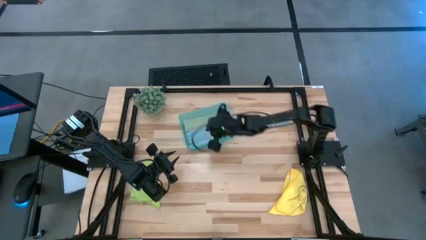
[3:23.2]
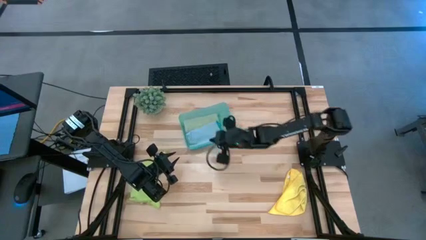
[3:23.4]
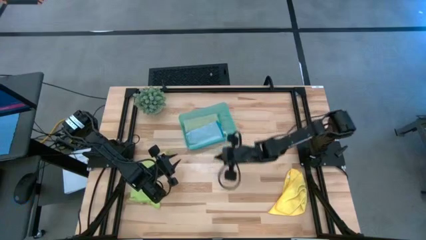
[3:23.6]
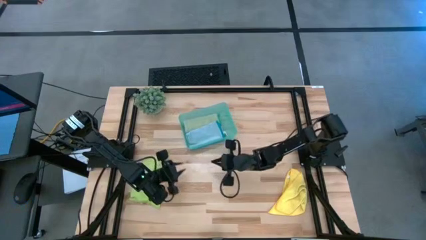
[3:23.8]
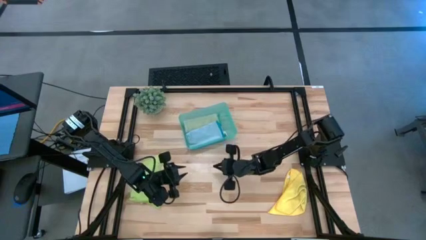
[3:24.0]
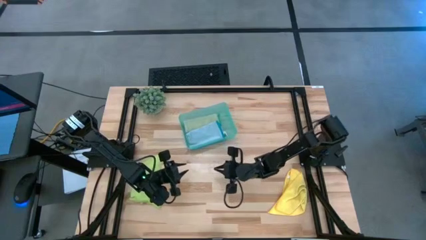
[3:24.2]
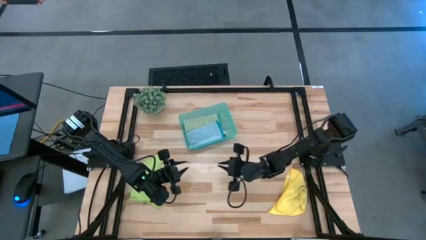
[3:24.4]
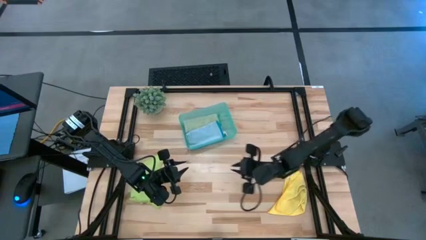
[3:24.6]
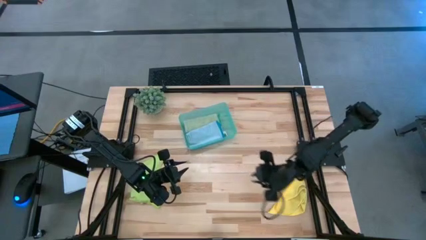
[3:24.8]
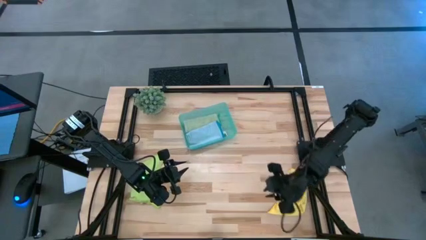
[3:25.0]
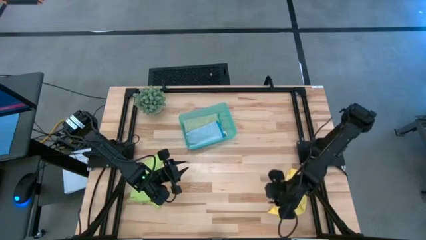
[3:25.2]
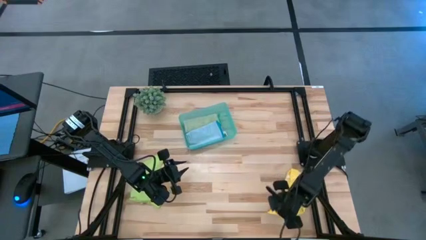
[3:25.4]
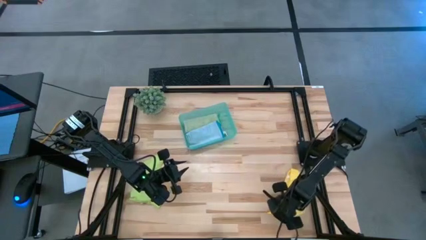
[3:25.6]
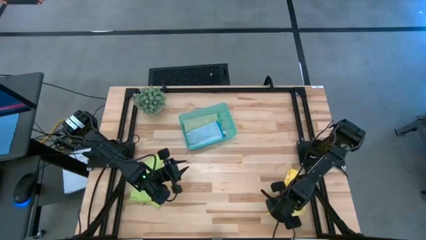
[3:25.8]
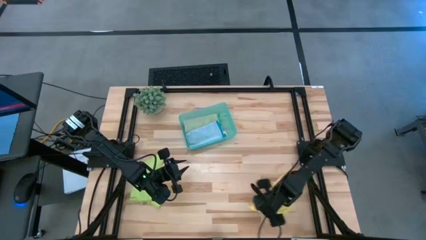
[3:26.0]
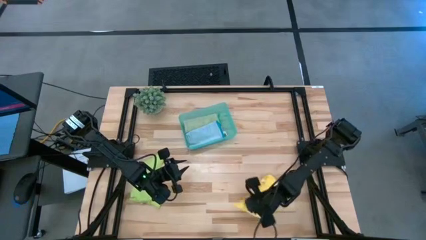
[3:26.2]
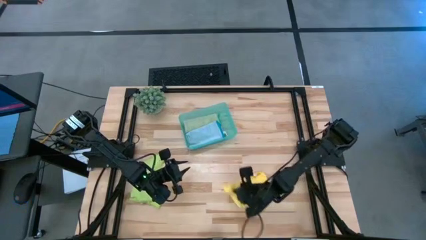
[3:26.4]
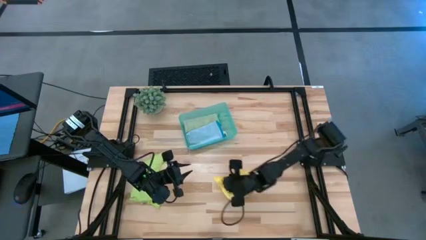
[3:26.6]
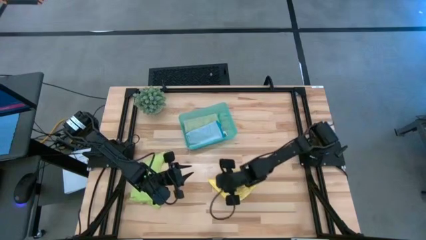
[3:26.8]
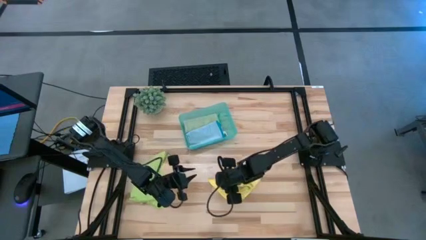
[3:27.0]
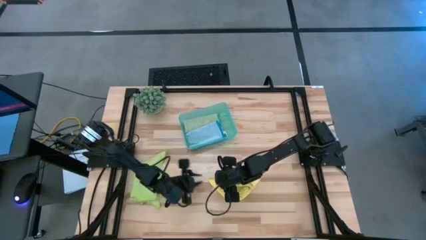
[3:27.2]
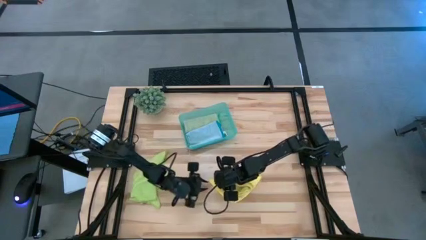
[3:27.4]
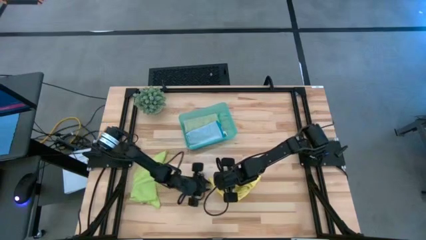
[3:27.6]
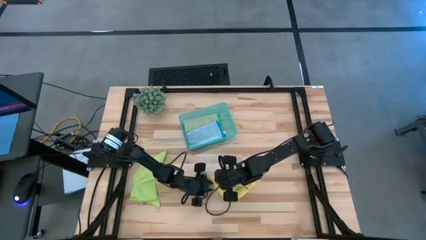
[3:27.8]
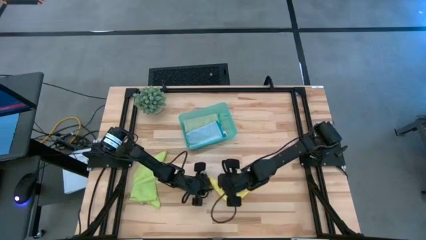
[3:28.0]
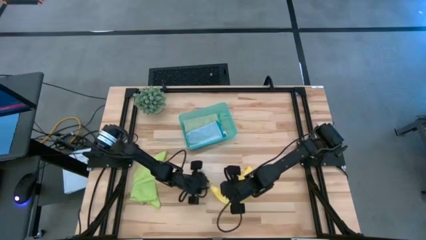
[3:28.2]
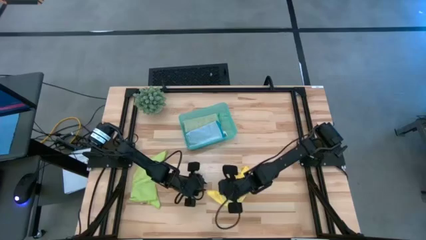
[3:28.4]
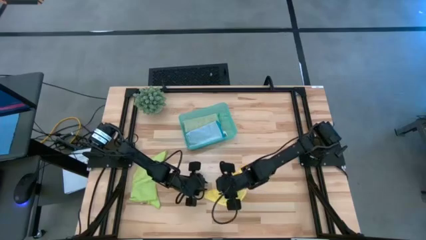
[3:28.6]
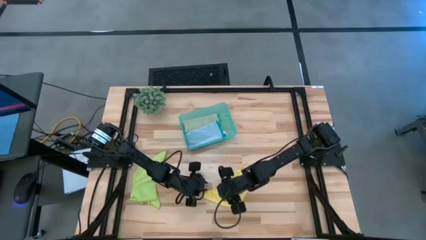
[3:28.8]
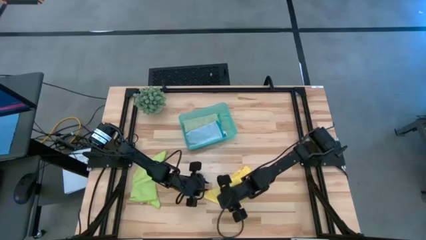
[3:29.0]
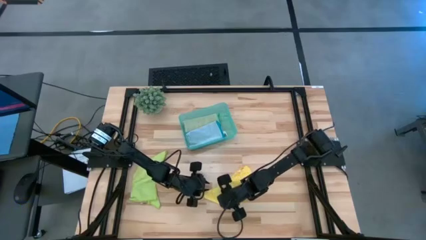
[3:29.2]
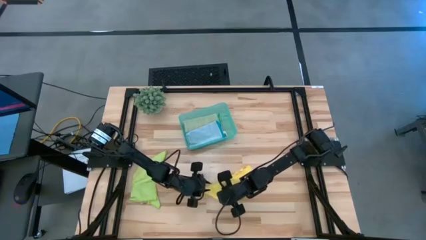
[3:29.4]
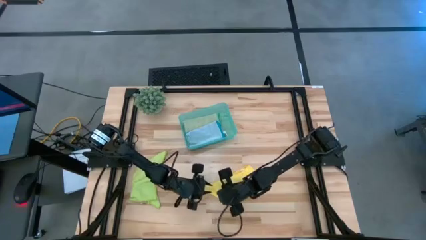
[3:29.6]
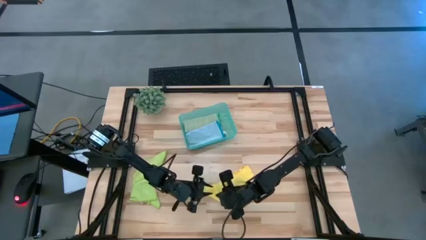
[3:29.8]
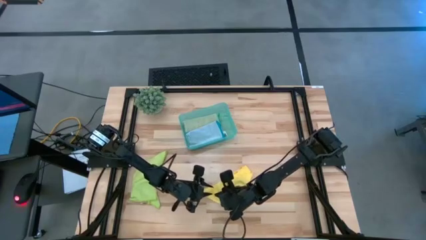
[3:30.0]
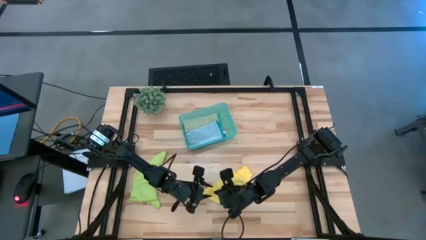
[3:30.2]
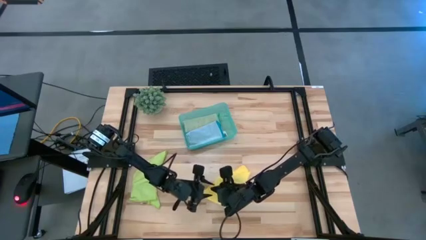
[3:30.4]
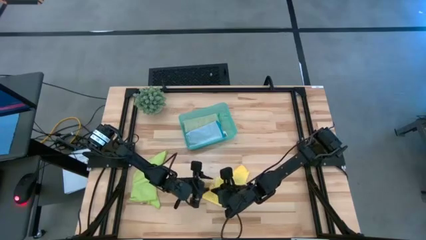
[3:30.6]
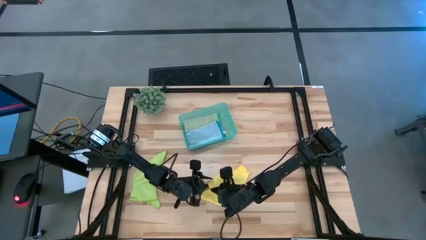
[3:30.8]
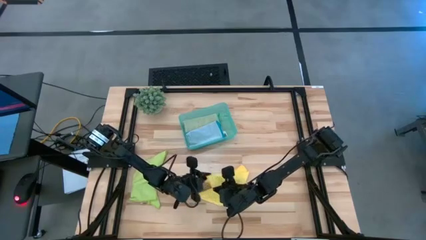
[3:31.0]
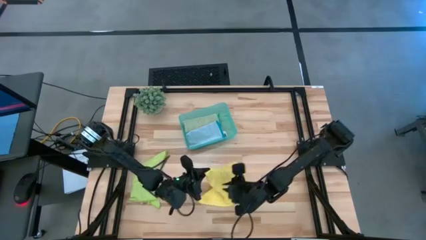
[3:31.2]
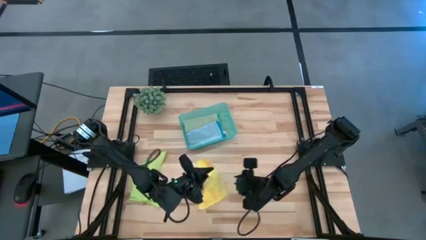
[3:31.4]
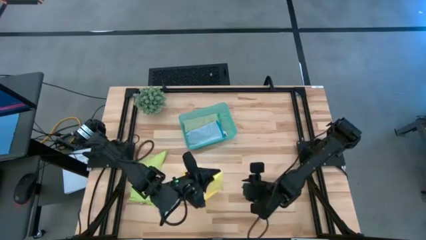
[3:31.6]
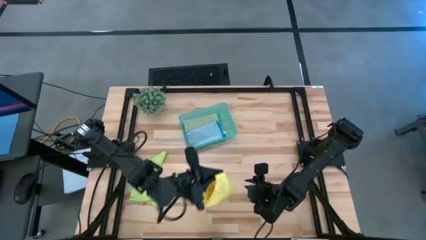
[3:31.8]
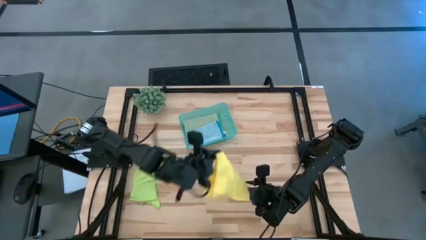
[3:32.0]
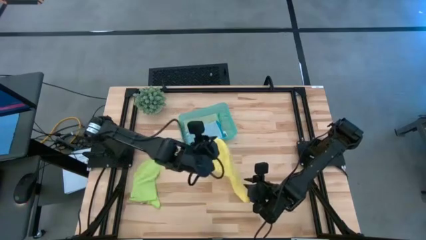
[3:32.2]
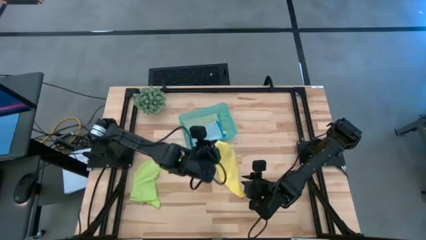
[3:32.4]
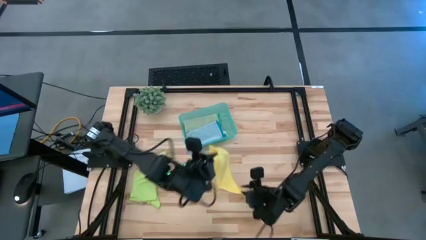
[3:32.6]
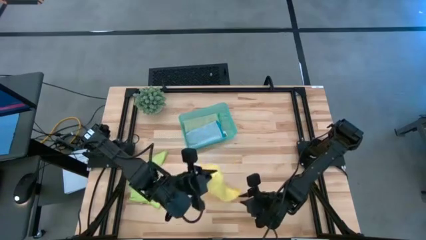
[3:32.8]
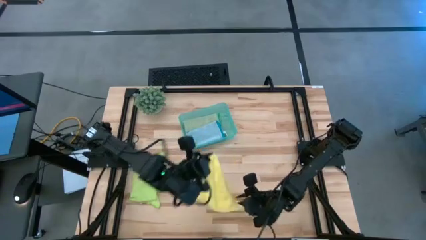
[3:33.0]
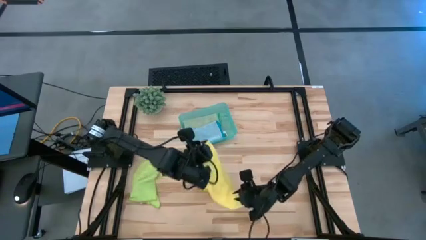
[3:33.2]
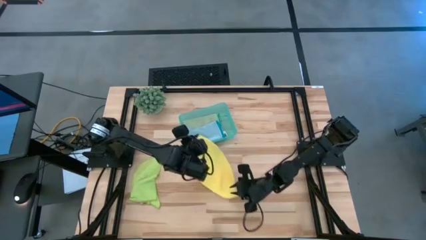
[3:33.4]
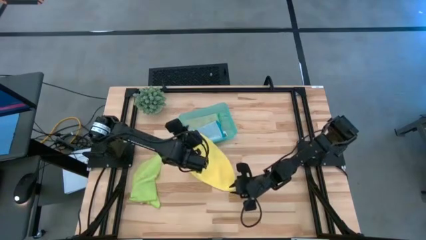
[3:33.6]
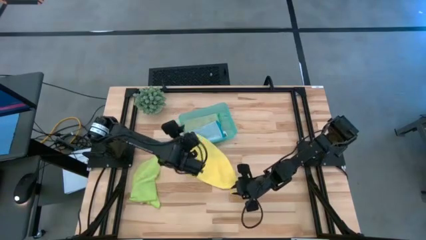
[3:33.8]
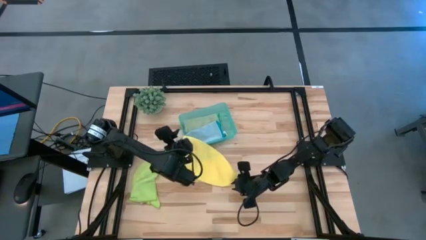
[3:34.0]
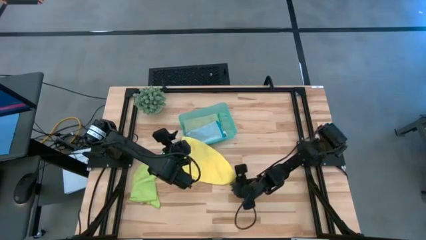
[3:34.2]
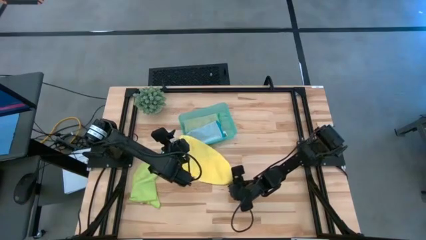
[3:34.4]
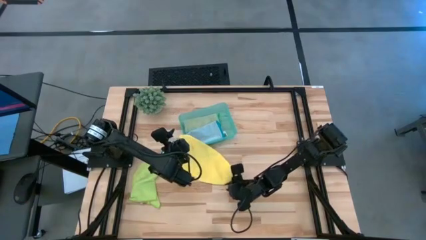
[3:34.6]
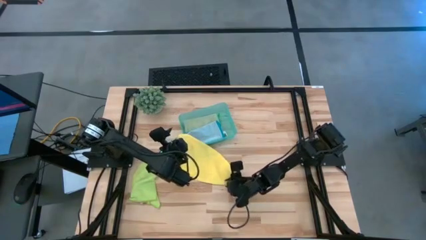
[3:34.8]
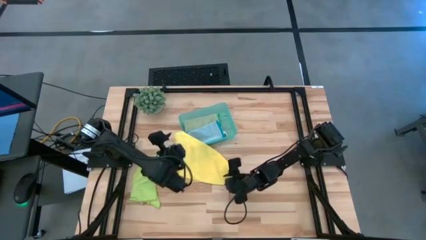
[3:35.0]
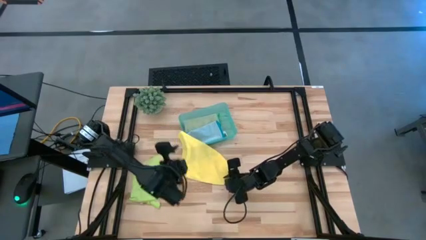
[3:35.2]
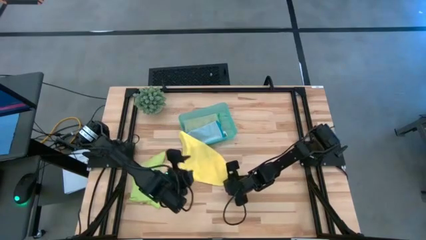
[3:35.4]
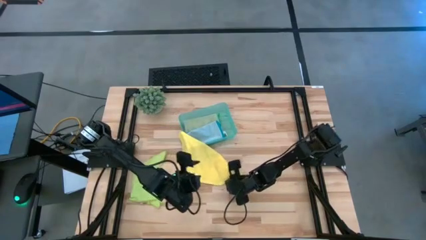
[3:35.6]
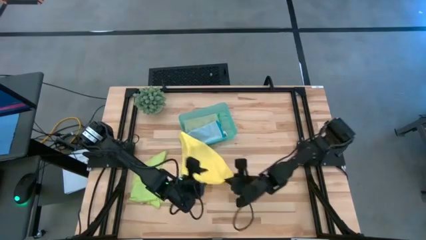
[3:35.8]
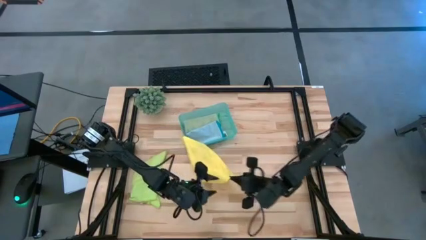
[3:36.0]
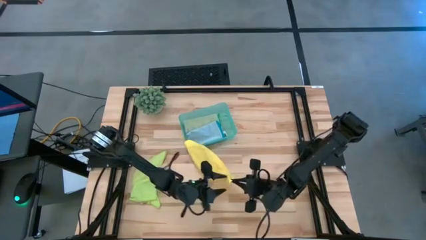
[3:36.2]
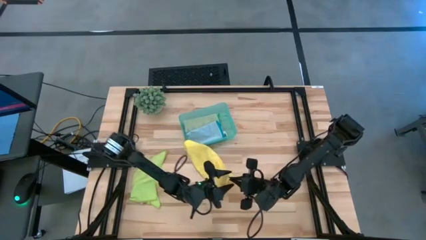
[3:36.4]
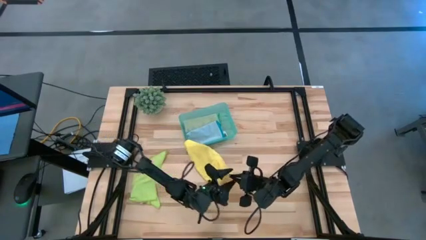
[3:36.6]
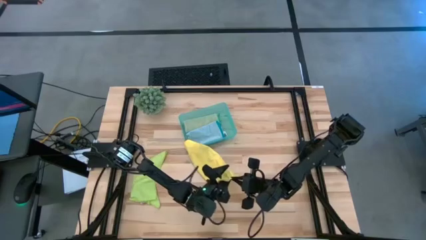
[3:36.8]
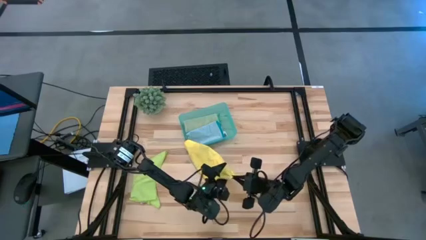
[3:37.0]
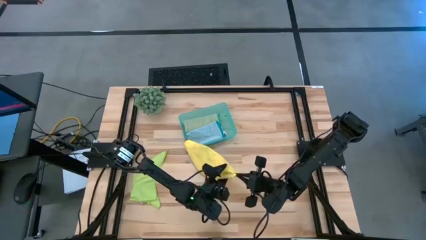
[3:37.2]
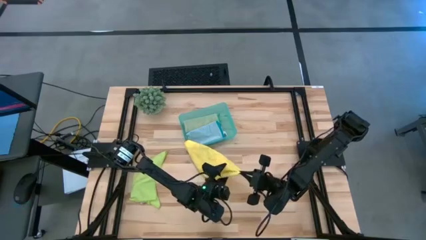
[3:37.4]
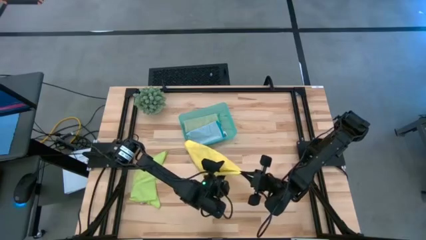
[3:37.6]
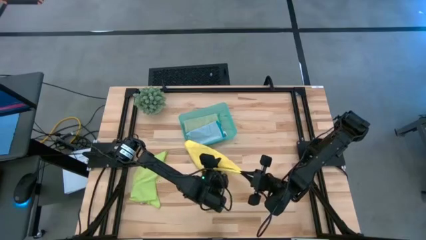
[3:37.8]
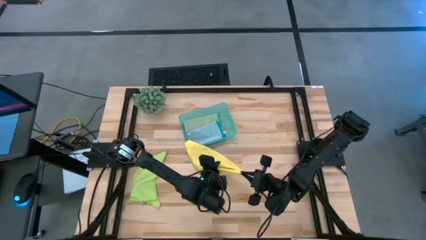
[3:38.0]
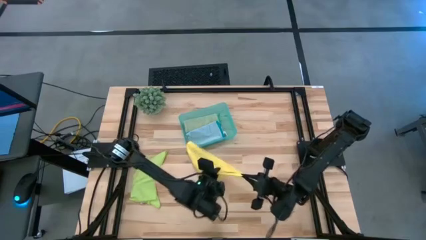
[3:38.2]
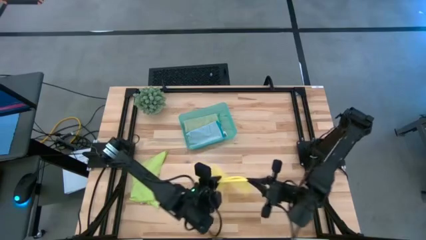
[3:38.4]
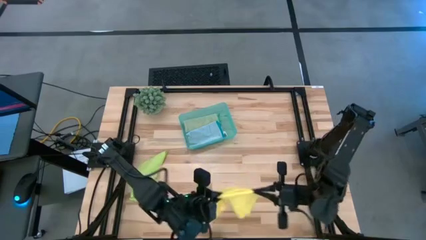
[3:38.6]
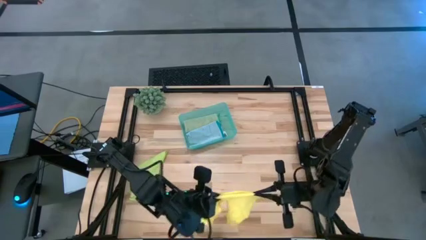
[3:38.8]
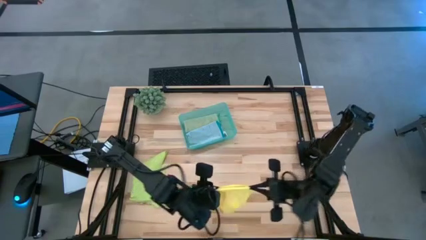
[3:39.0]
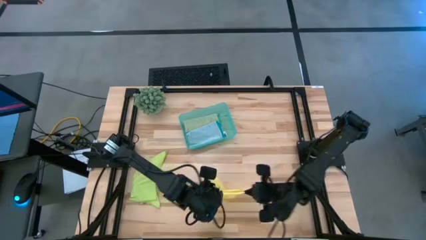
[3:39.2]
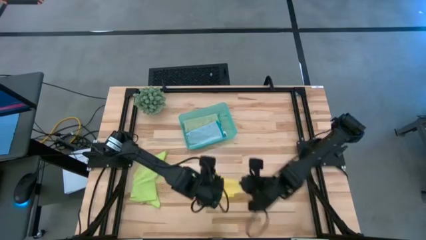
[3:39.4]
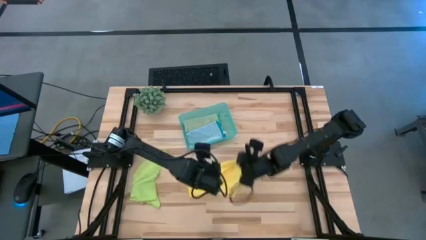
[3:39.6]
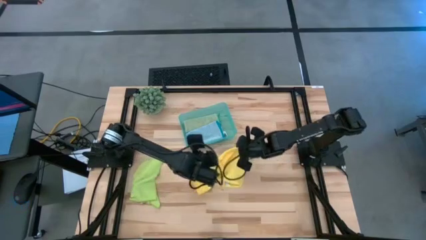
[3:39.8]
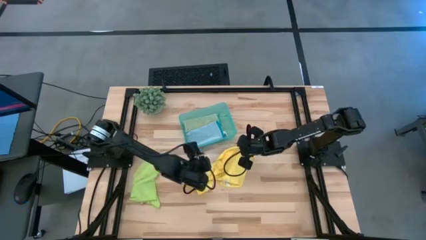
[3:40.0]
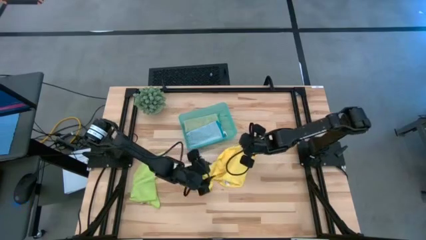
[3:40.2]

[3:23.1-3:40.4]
Task: Fold microfiber towels
Fold the yellow towel
